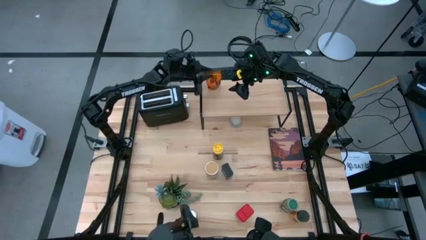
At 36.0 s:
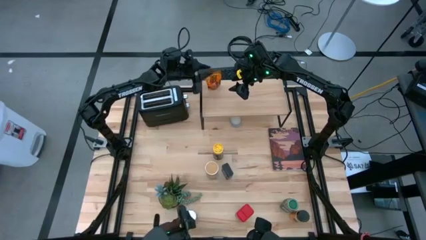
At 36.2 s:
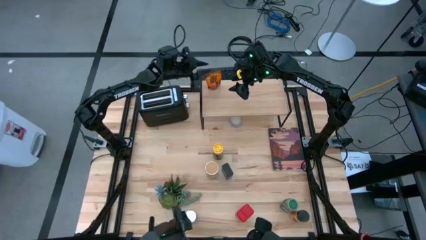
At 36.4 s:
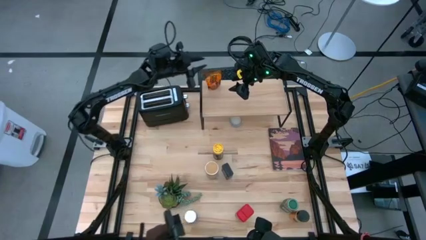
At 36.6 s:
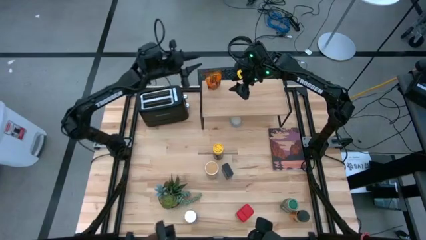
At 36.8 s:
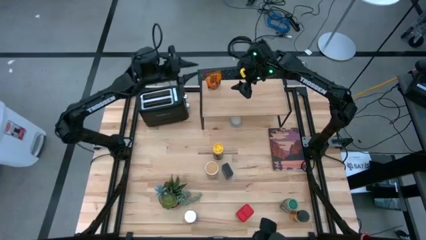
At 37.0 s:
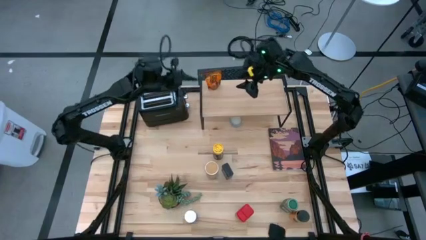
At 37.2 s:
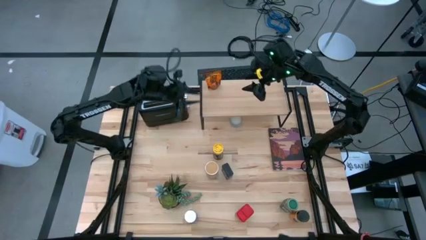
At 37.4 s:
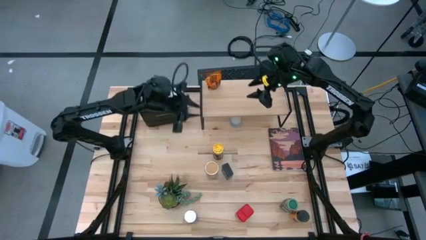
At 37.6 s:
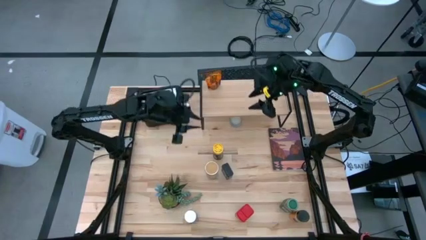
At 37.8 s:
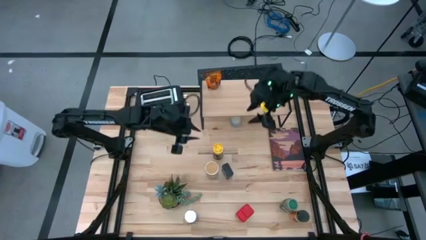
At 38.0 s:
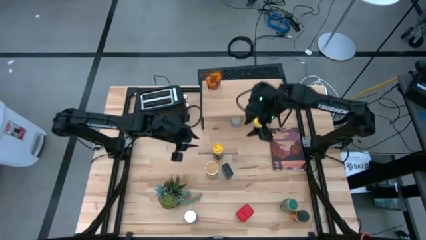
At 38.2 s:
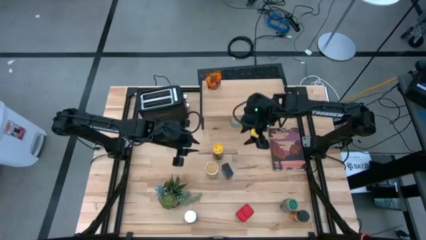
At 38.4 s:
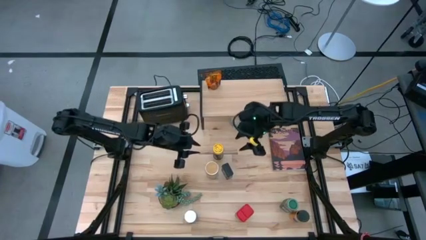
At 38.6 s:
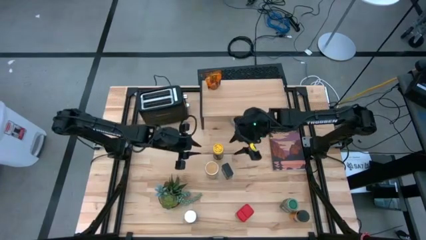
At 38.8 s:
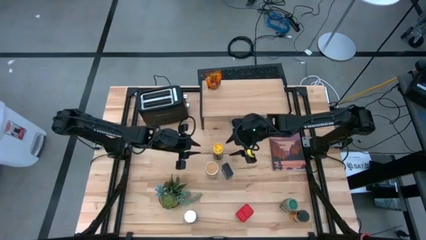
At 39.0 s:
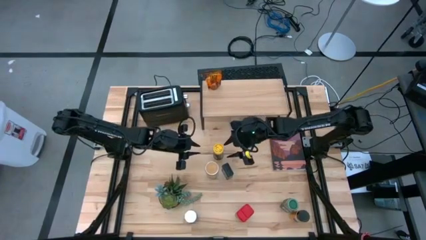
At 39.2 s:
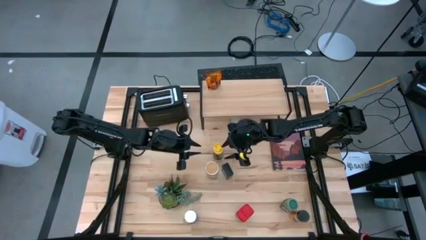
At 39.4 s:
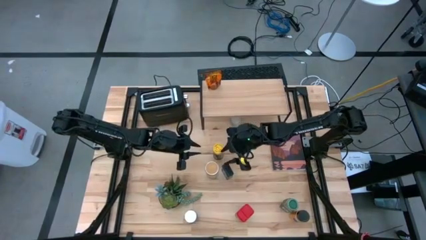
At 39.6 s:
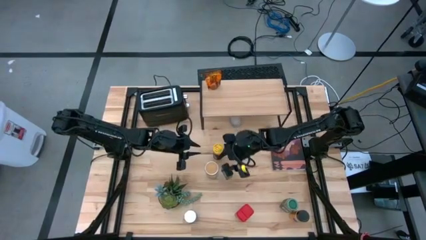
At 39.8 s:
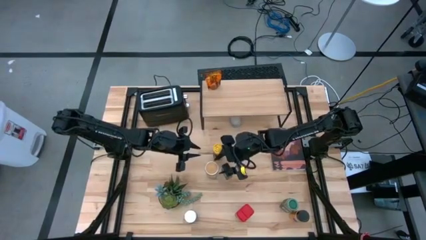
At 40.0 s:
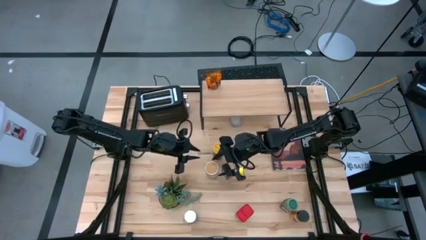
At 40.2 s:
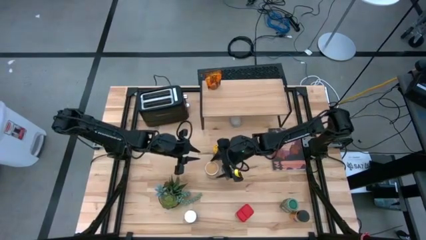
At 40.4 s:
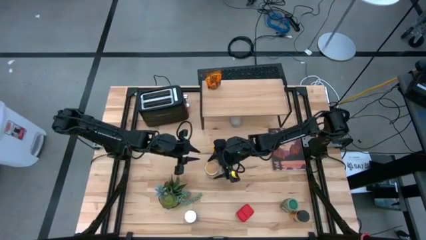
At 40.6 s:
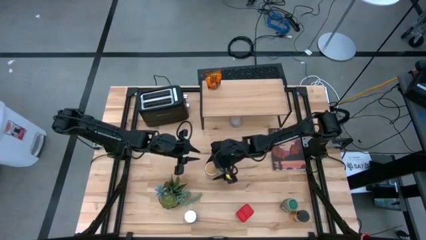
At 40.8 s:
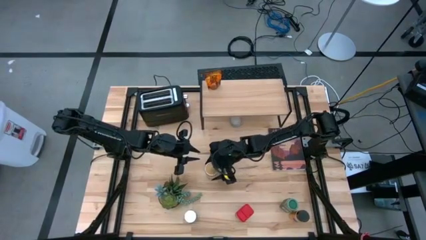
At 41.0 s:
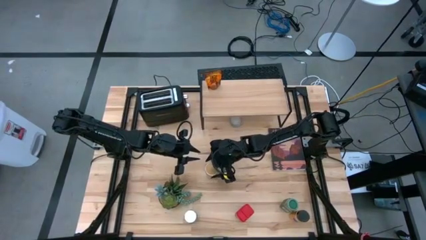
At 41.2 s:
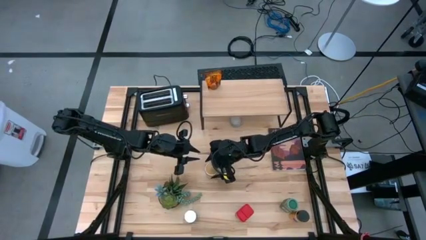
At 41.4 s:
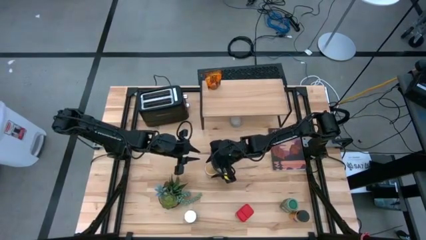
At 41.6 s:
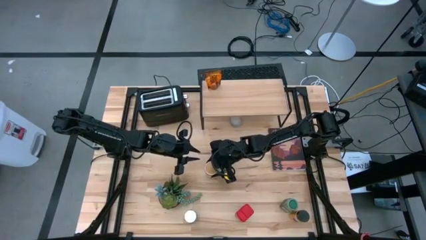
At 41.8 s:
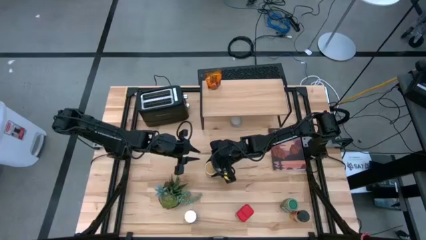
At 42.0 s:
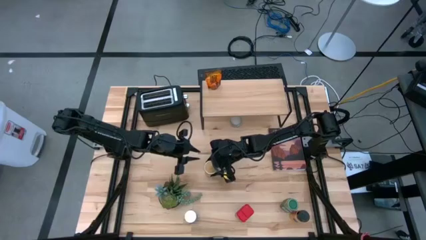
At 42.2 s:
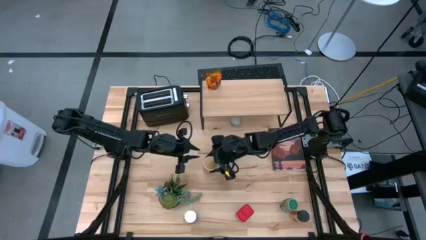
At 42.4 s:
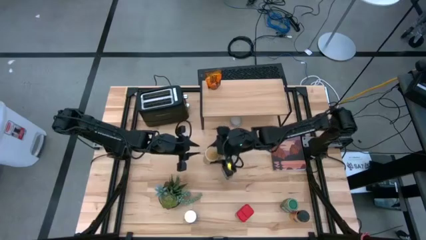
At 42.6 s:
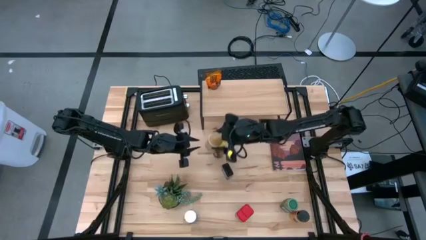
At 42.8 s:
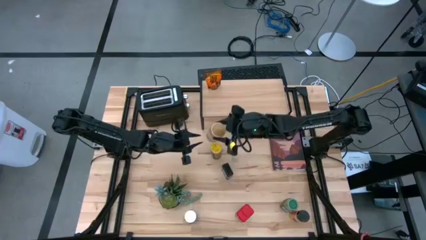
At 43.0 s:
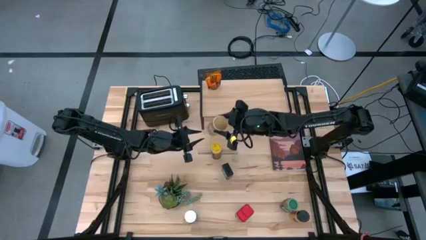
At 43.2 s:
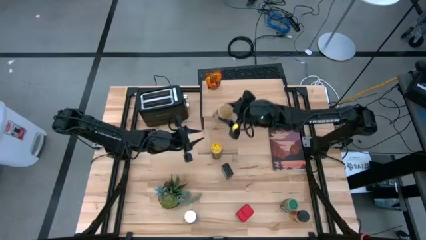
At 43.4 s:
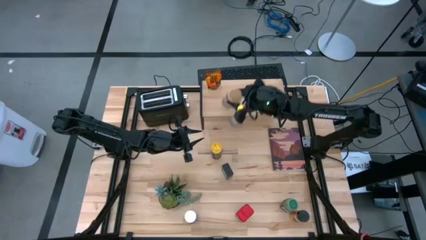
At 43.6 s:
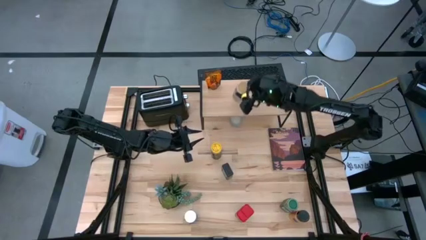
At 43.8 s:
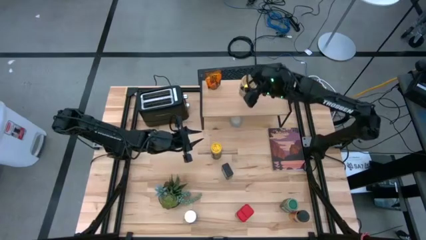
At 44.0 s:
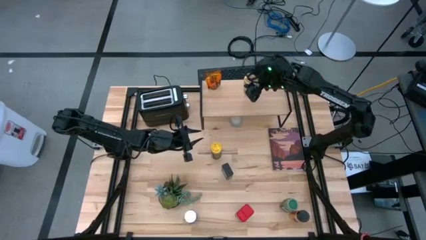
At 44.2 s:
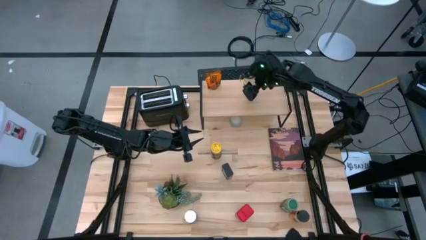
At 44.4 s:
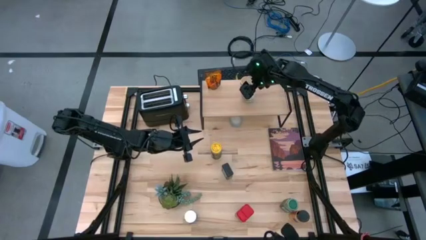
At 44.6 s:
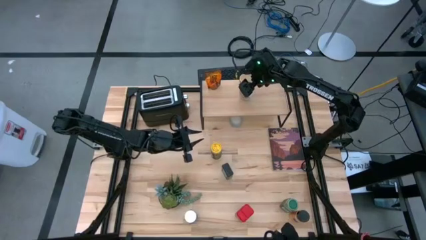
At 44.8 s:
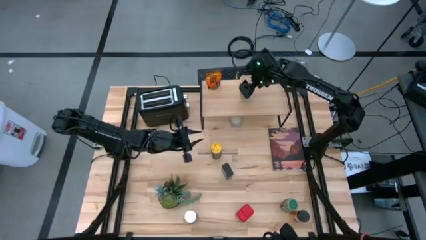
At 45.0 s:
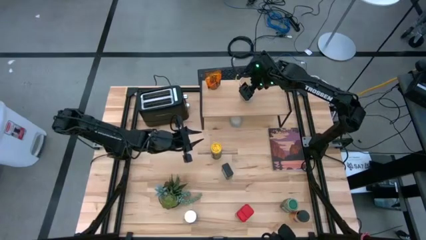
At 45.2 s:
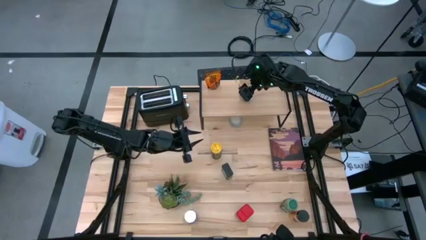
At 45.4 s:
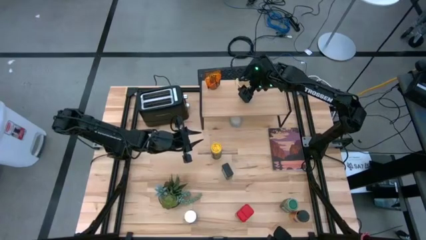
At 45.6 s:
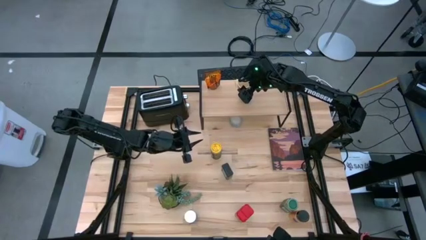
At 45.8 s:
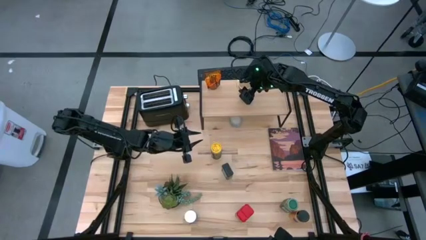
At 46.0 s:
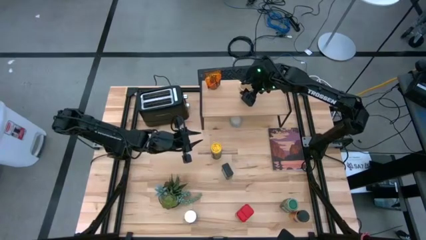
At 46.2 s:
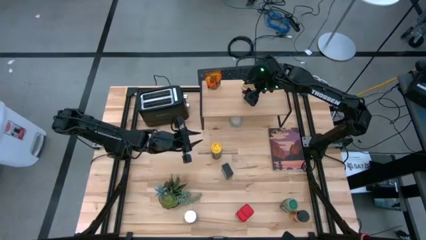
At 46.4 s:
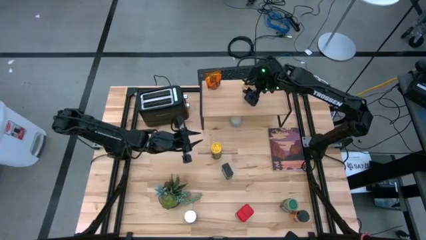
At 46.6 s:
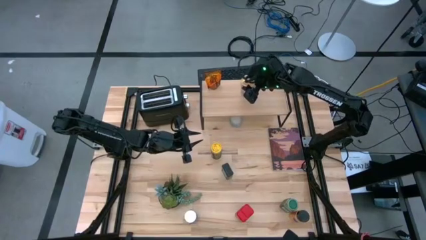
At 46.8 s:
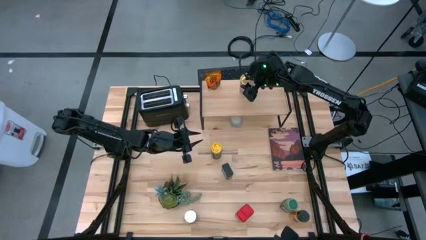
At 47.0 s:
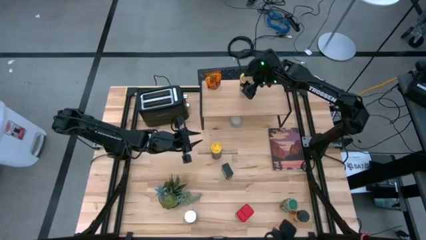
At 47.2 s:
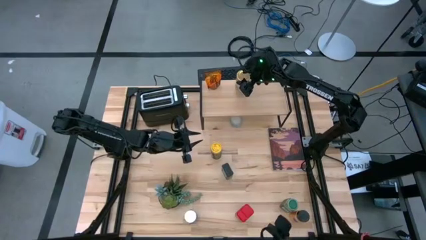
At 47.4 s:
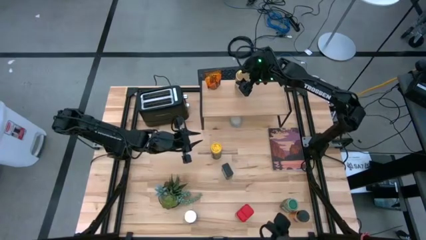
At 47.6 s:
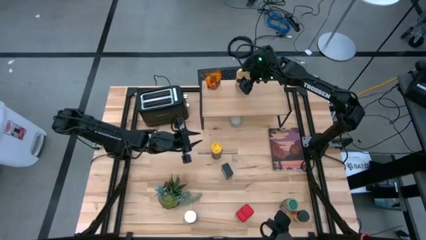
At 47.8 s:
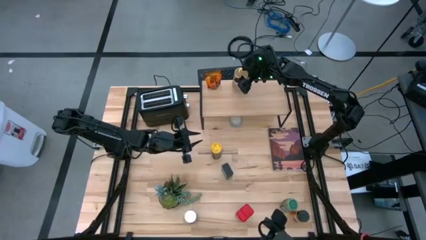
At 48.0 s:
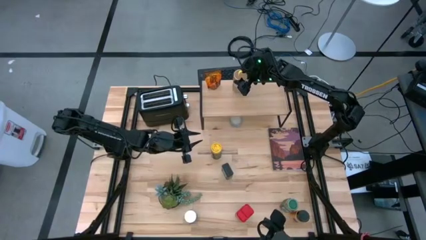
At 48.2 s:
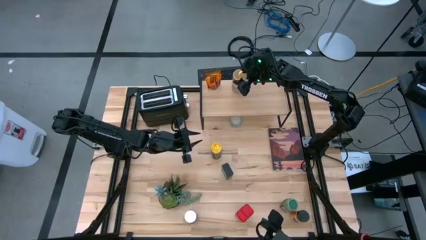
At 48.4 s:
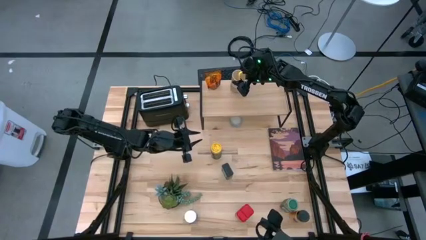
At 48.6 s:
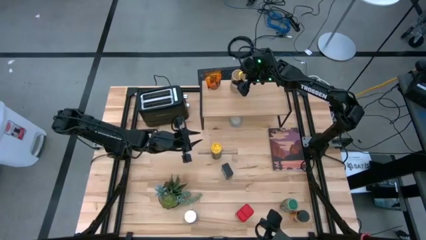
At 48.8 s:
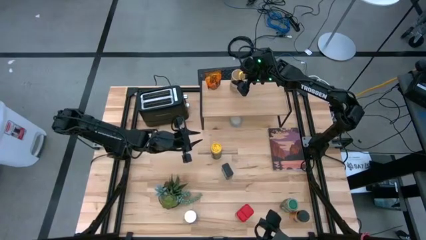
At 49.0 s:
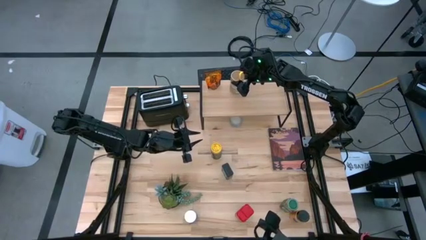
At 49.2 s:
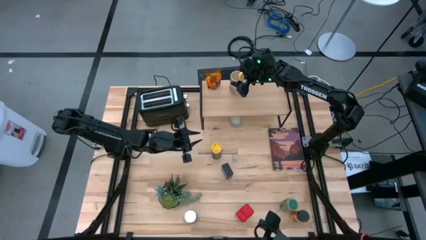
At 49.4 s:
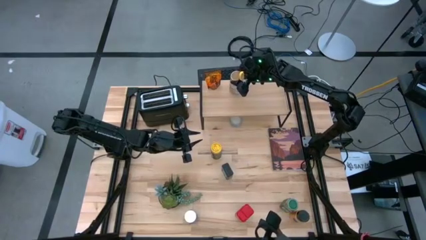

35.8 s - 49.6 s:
Task: Shelf spices
Put the golden seasoning bottle on the shelf

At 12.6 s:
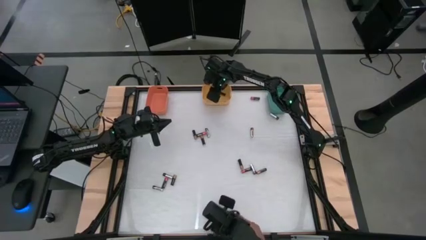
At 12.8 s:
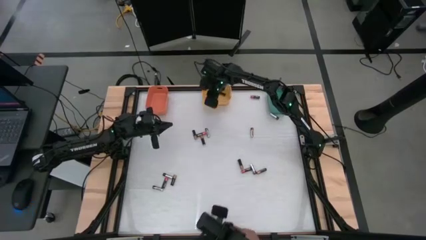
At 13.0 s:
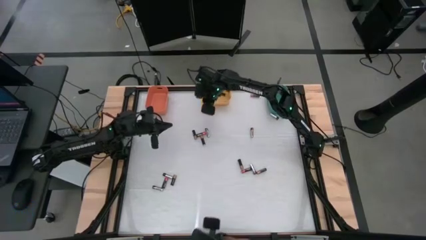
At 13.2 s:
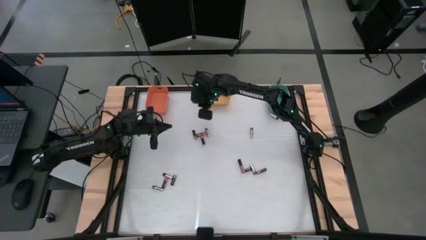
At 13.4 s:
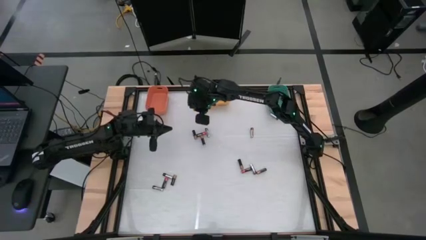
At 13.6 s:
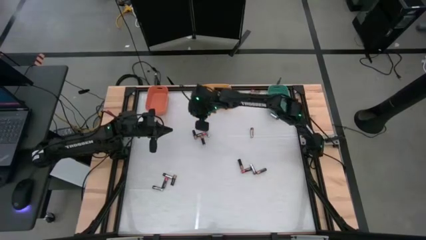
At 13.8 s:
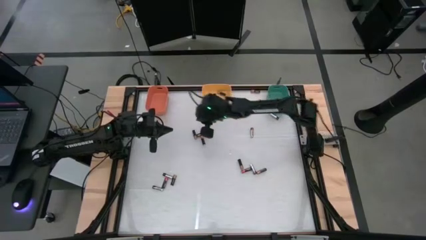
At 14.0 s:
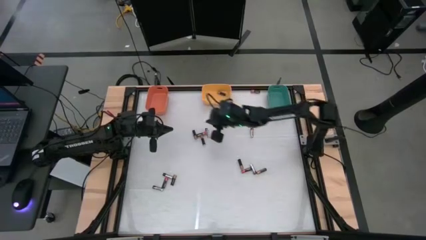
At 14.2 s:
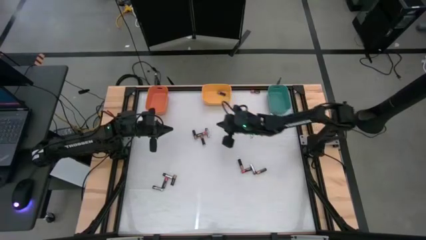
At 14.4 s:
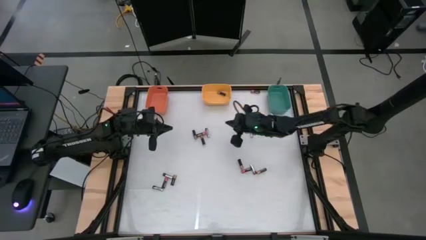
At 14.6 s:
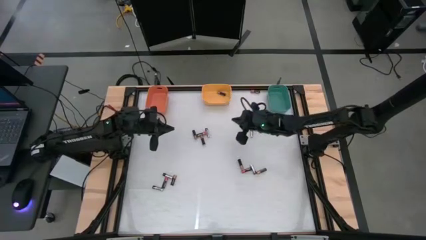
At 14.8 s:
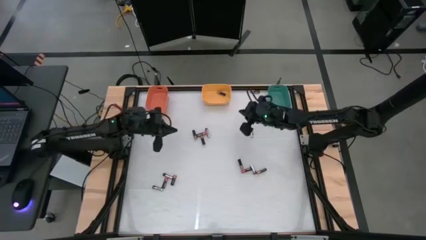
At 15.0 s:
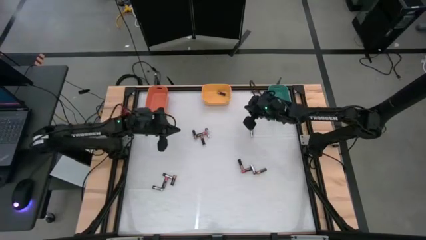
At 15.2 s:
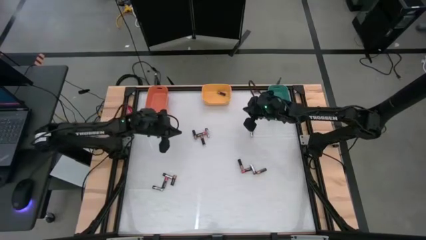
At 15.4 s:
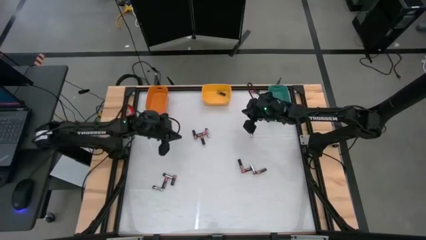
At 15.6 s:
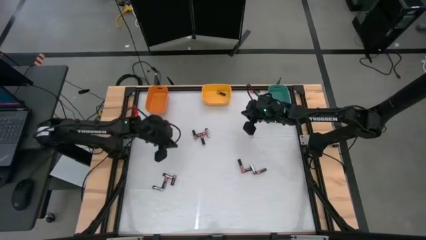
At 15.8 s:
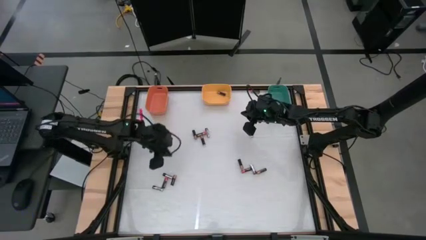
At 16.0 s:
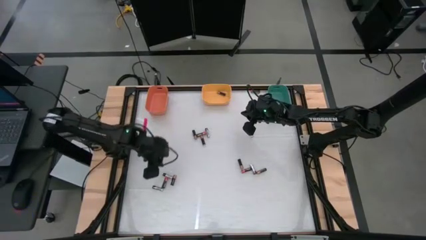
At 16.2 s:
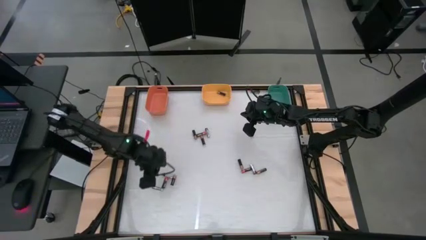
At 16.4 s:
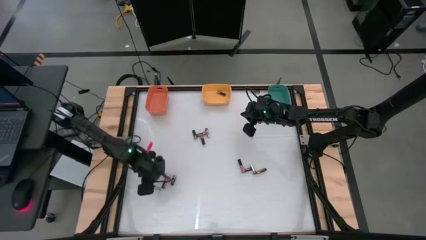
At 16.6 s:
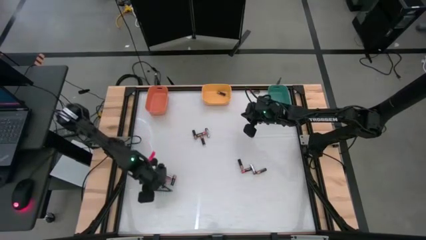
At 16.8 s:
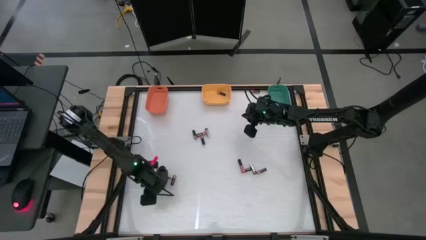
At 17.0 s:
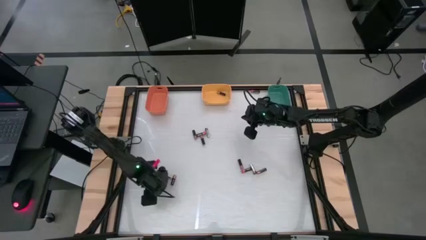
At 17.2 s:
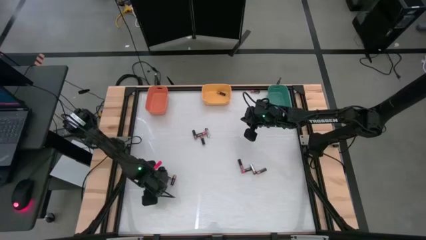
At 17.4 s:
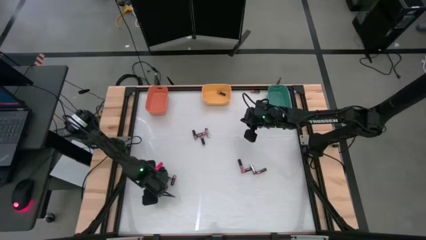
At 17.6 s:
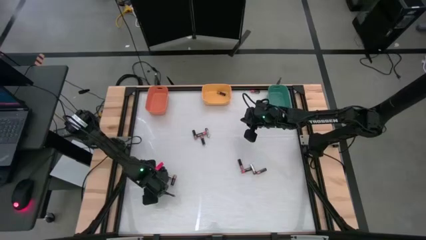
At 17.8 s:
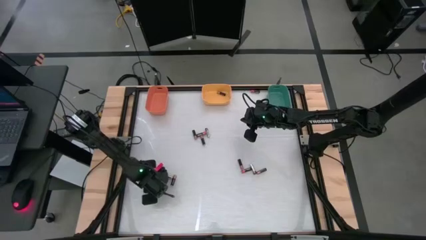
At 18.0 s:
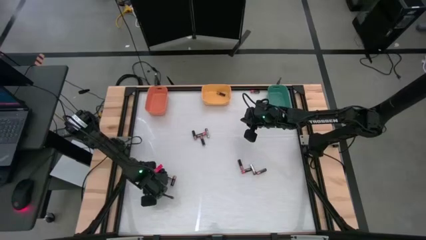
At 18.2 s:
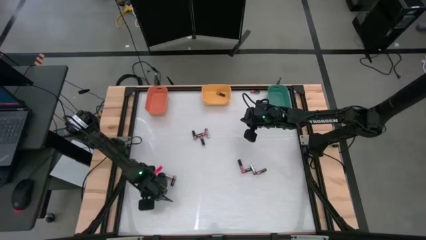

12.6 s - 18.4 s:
Task: Sort batteries
Put the black battery into the green bin
